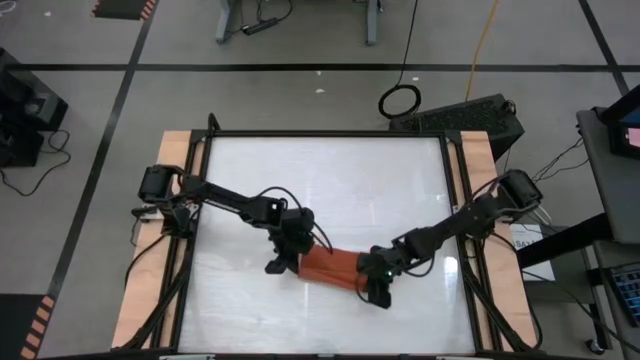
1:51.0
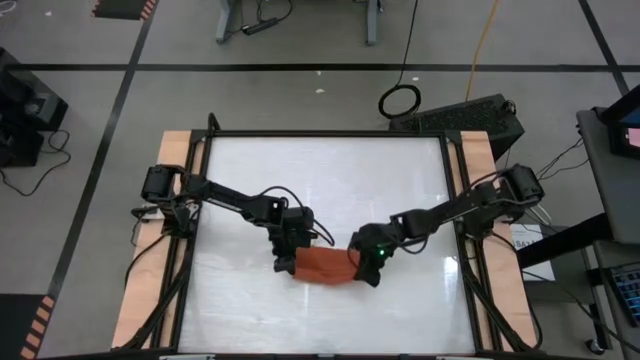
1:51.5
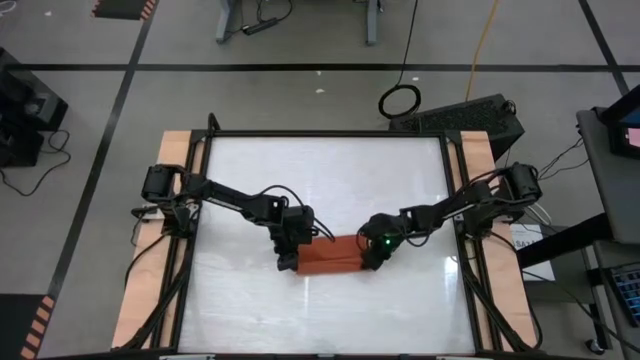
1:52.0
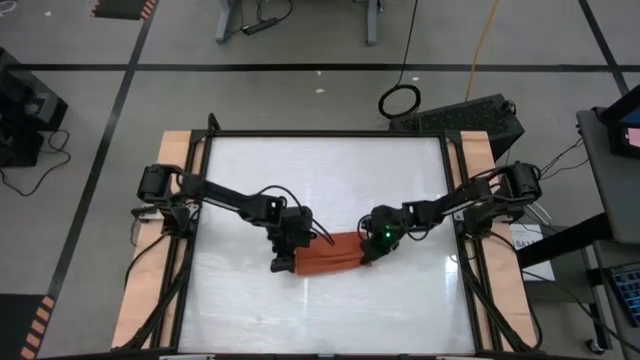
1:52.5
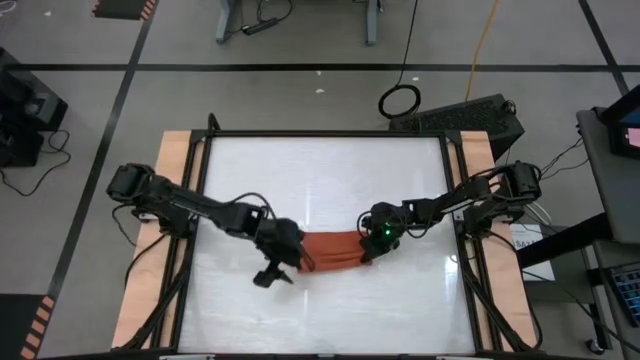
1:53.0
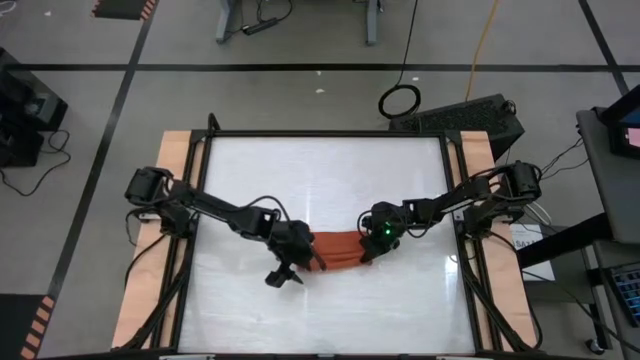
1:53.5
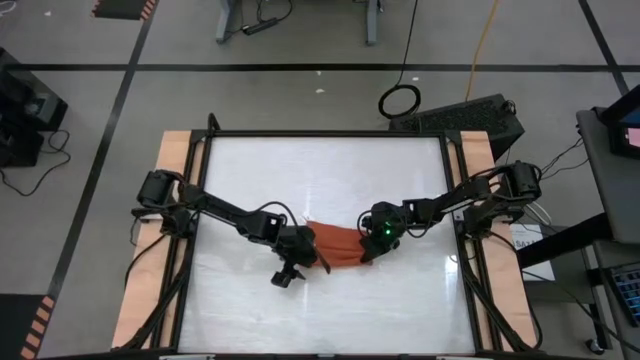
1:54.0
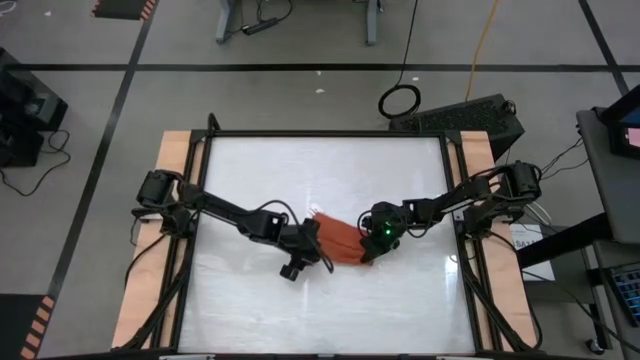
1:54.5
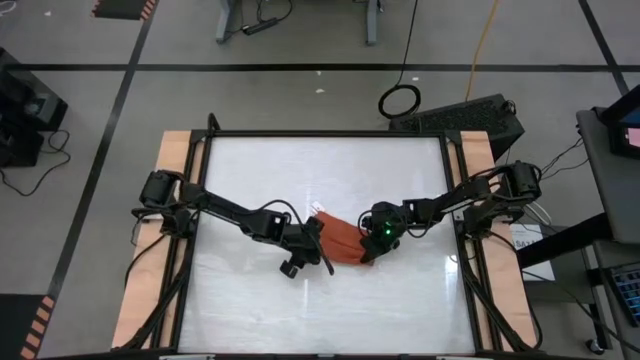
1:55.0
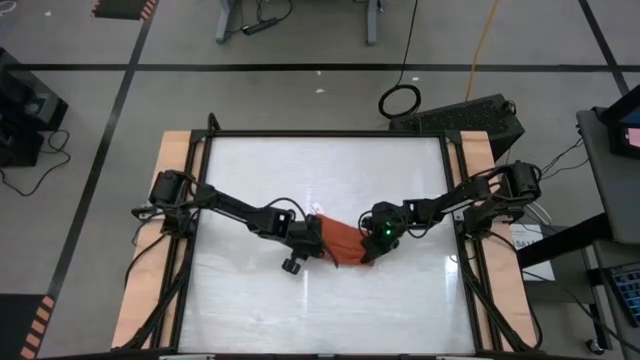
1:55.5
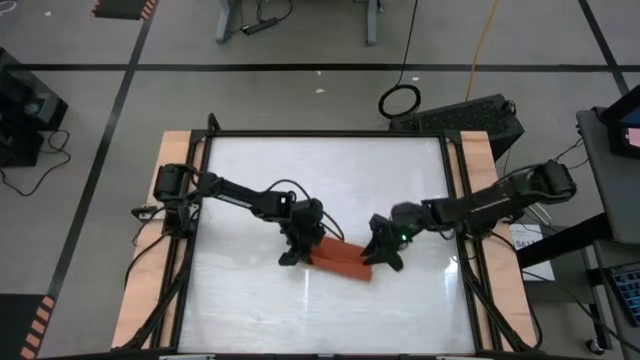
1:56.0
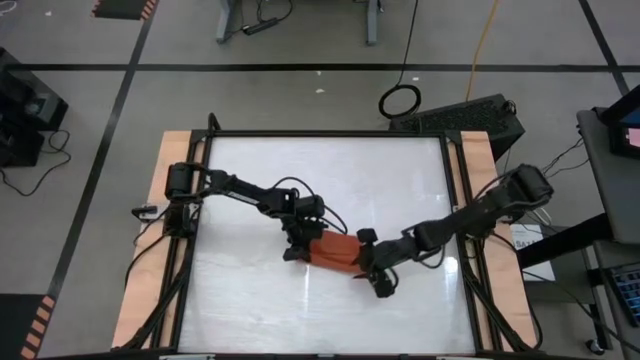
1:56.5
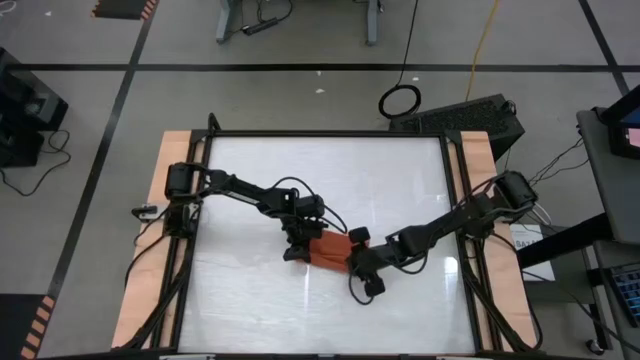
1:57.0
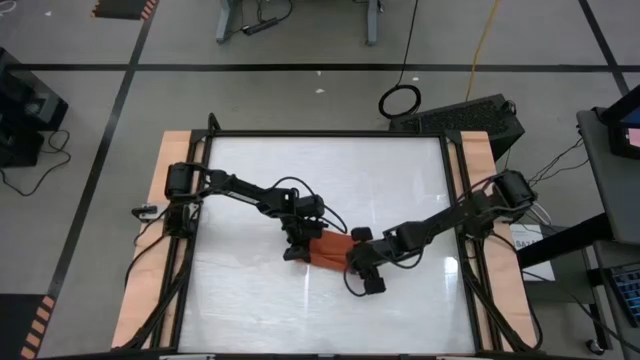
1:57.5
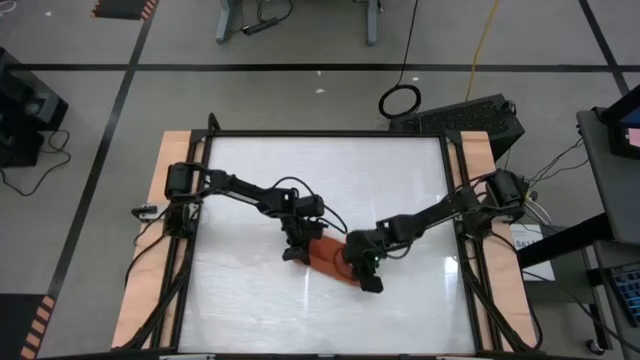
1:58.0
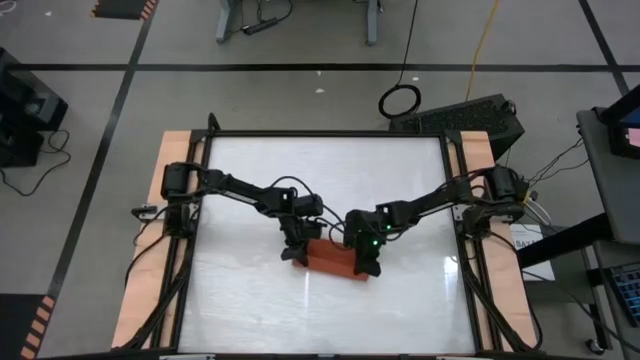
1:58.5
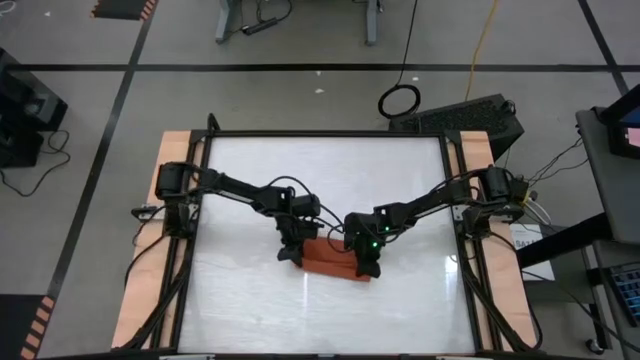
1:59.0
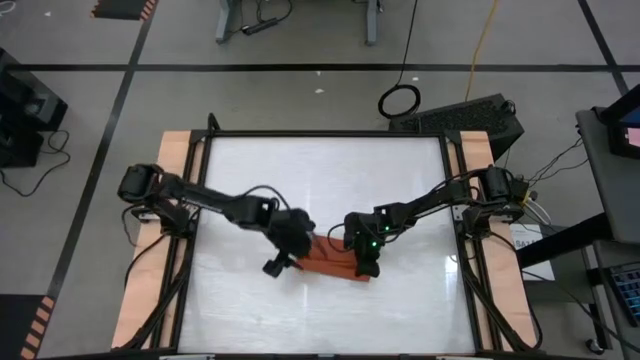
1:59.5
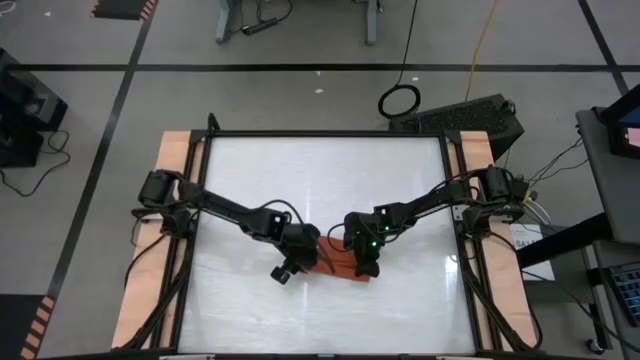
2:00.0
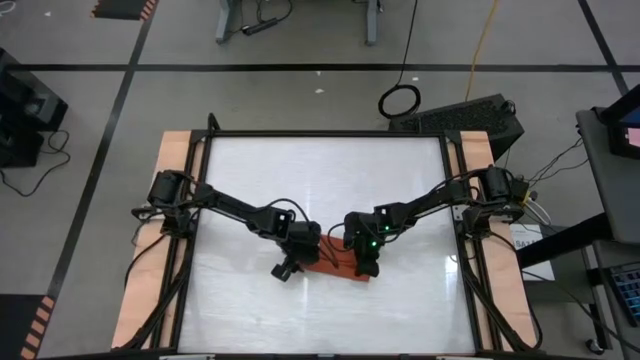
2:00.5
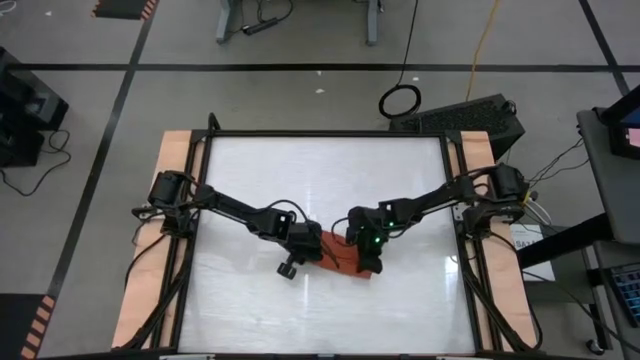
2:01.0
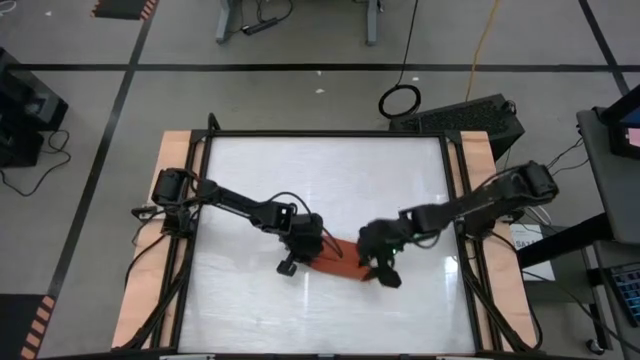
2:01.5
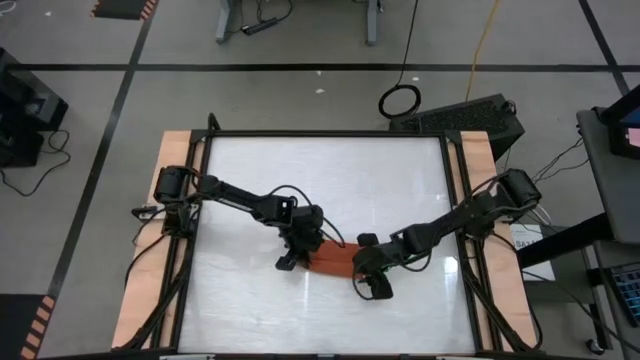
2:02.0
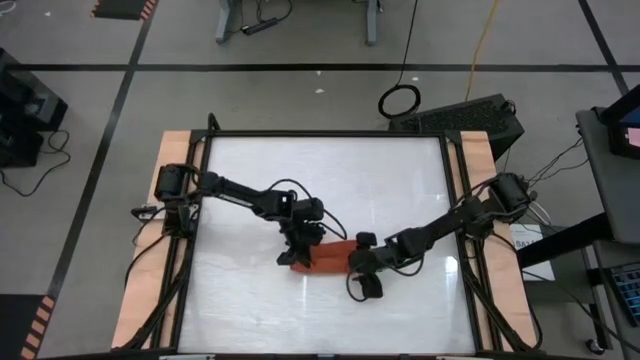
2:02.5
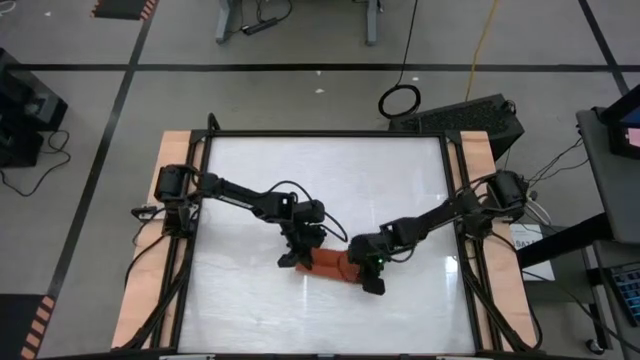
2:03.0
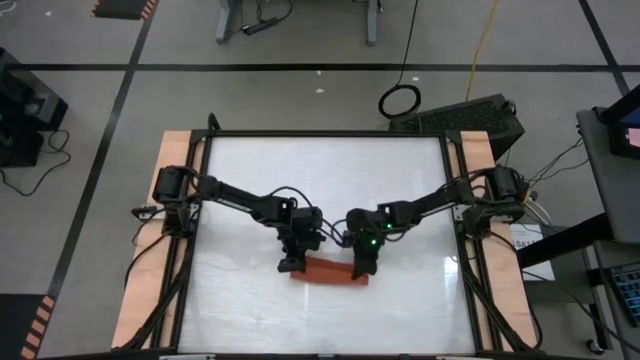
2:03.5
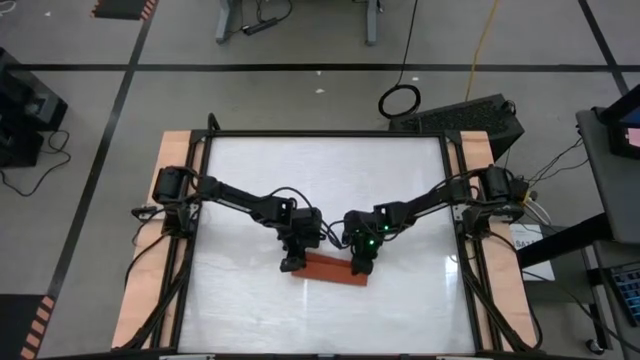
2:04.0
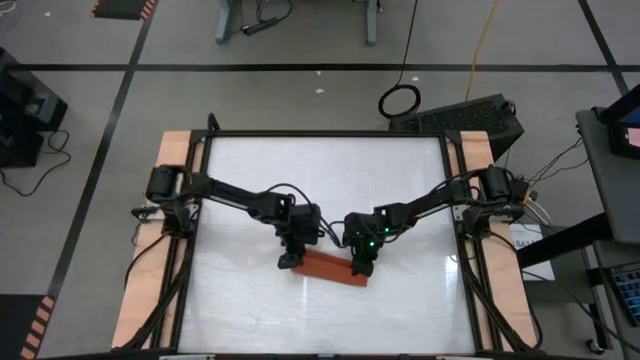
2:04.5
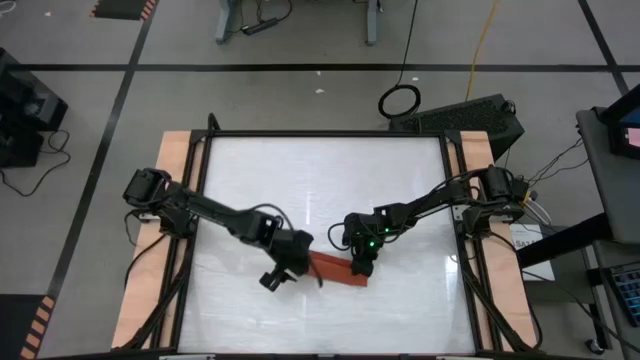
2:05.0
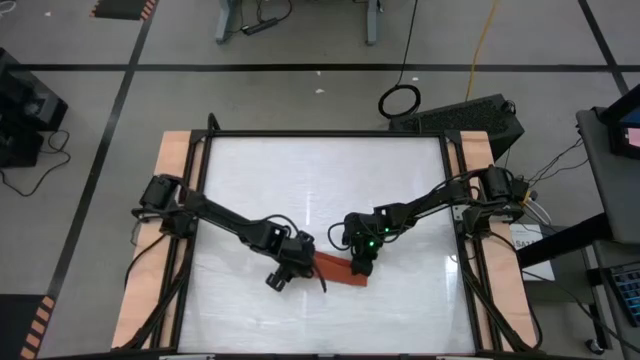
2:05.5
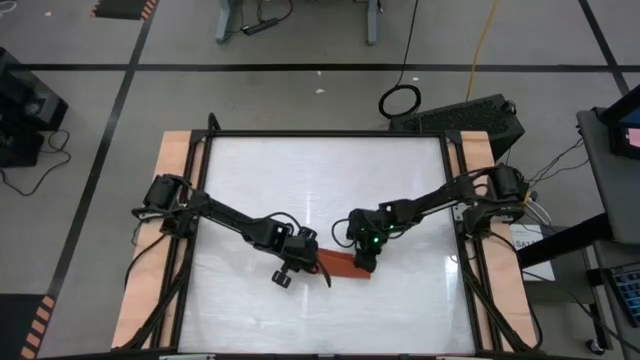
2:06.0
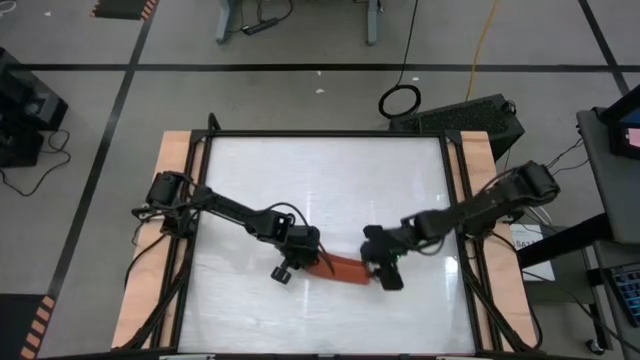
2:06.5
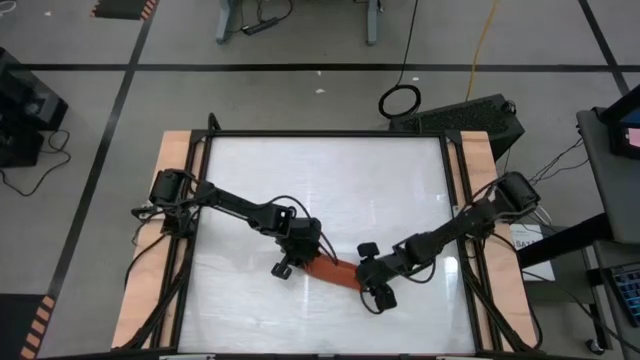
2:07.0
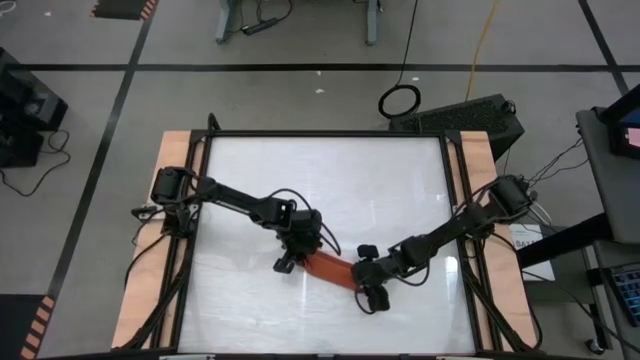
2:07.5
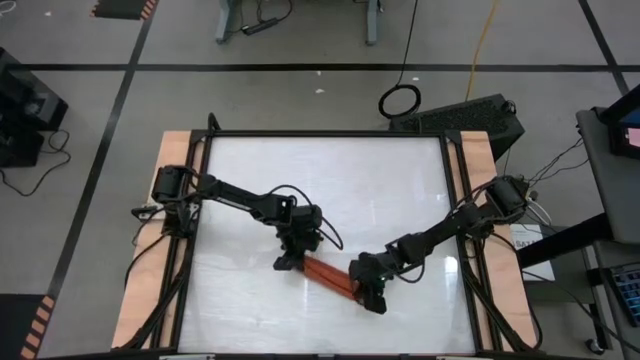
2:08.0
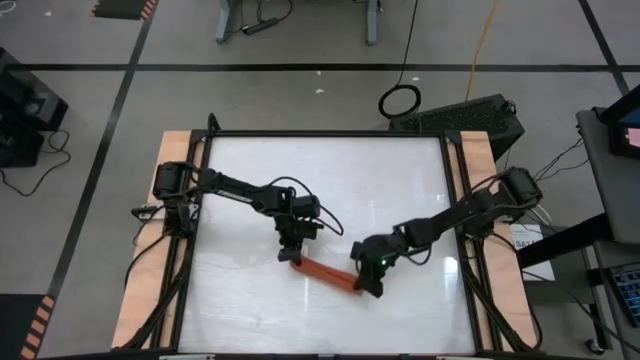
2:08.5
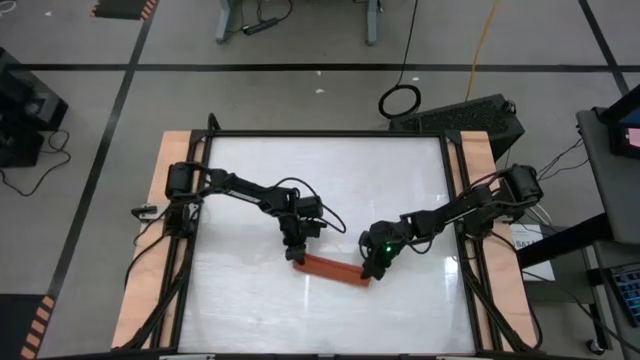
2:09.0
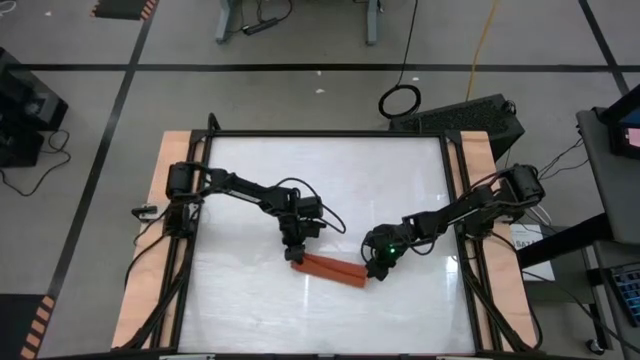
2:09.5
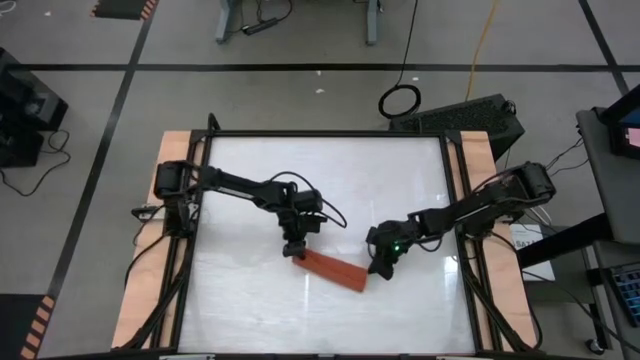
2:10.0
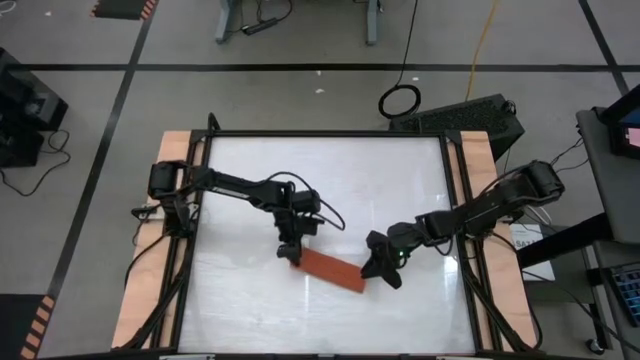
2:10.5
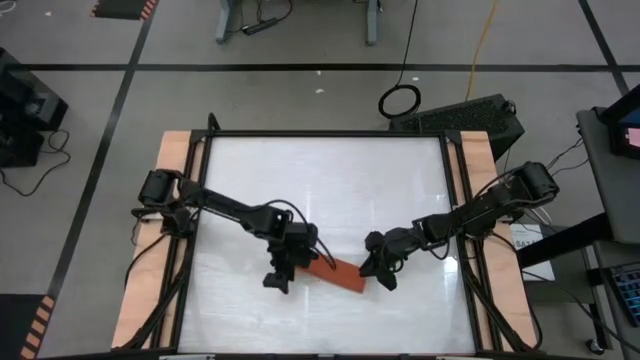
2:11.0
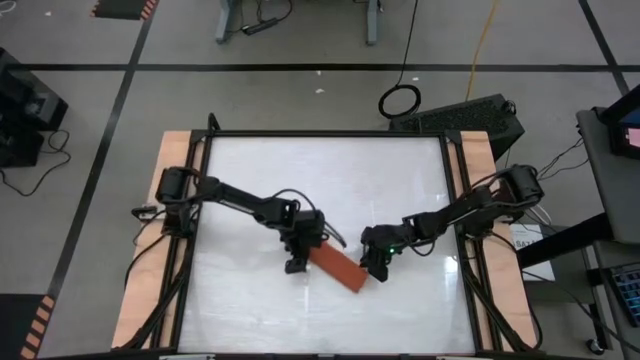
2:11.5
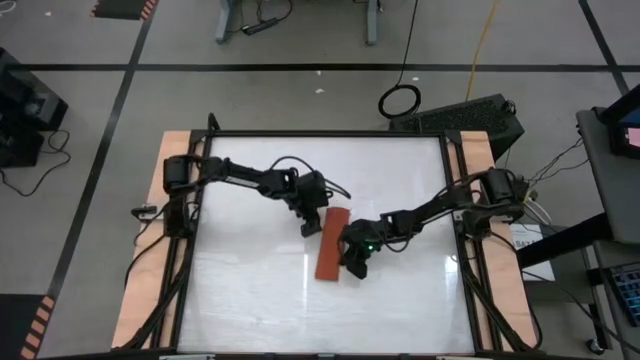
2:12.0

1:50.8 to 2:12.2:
Task: Roll towel
Roll the orange towel
